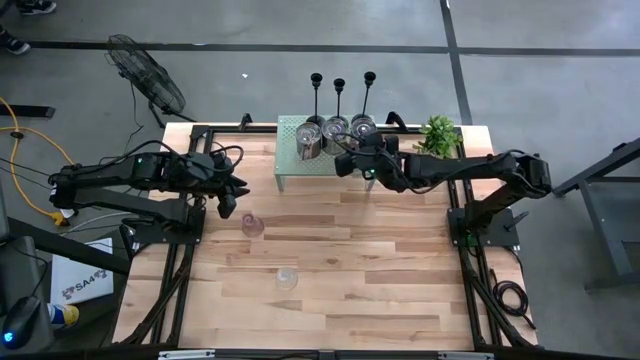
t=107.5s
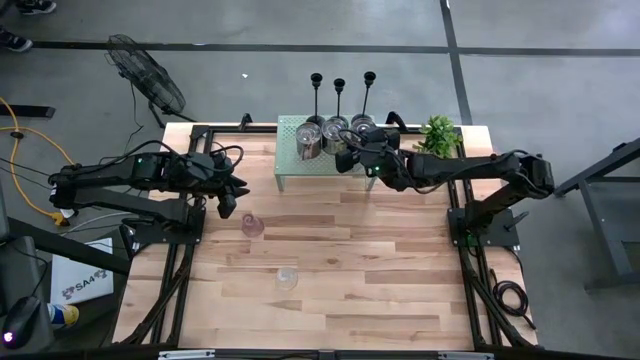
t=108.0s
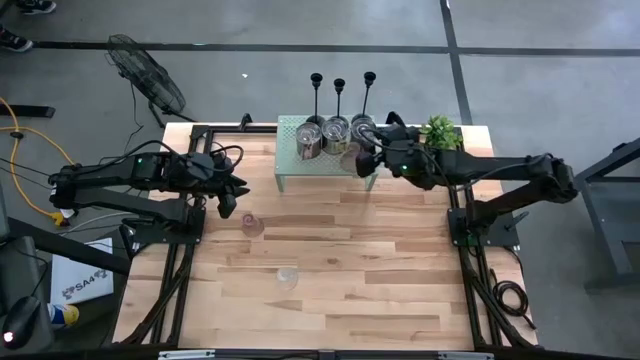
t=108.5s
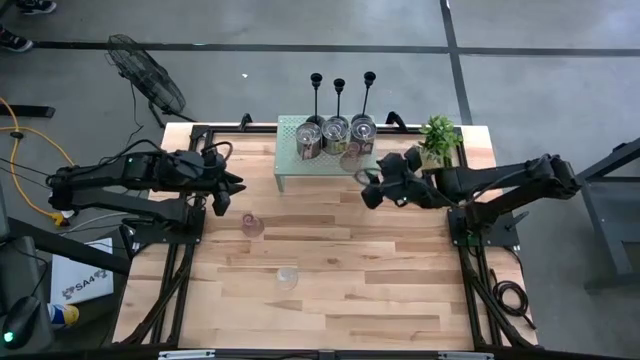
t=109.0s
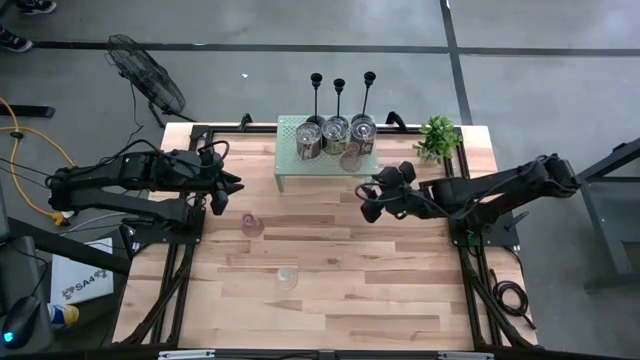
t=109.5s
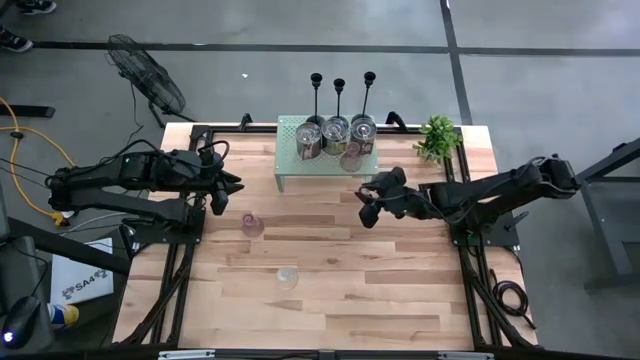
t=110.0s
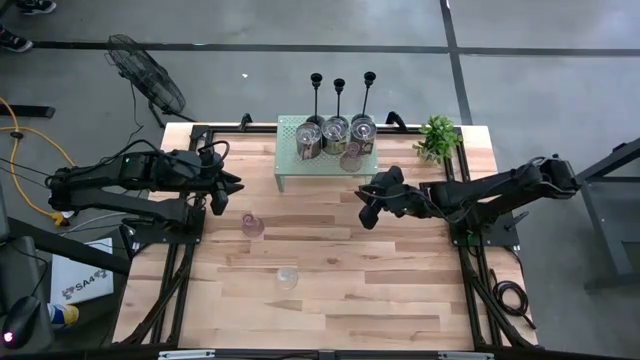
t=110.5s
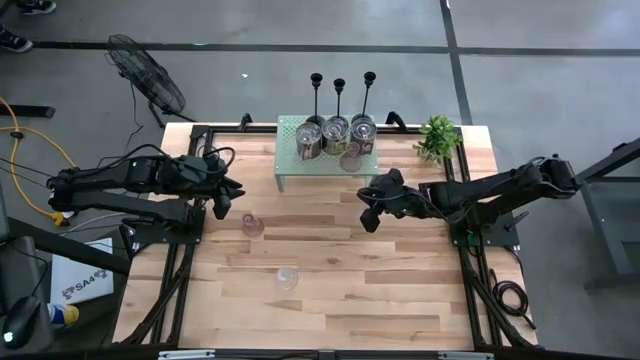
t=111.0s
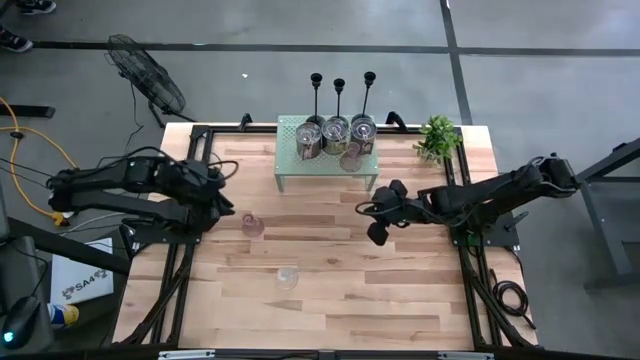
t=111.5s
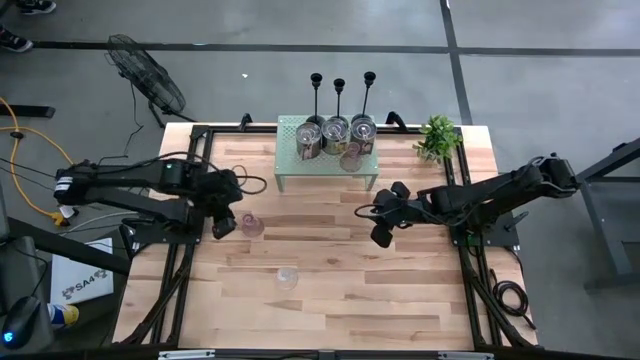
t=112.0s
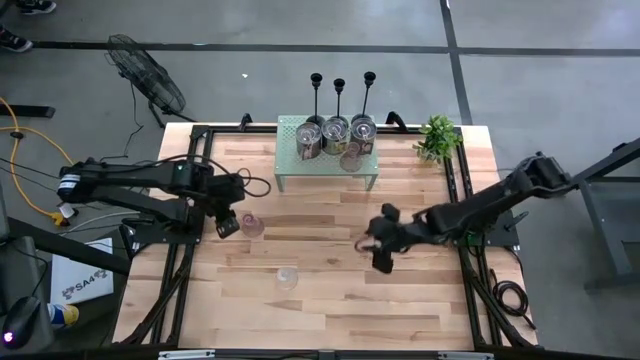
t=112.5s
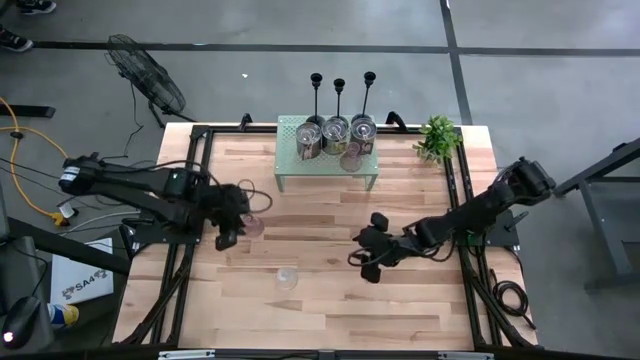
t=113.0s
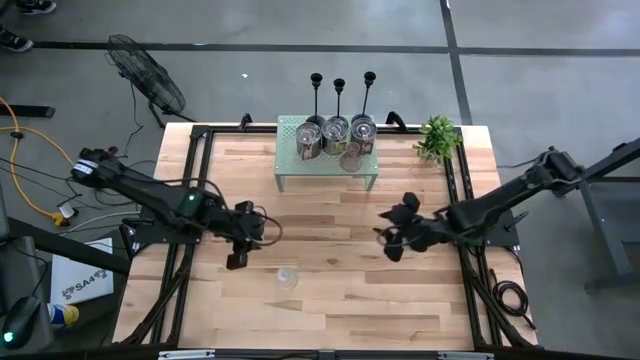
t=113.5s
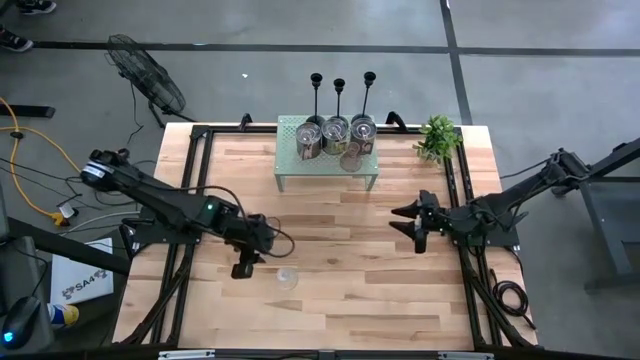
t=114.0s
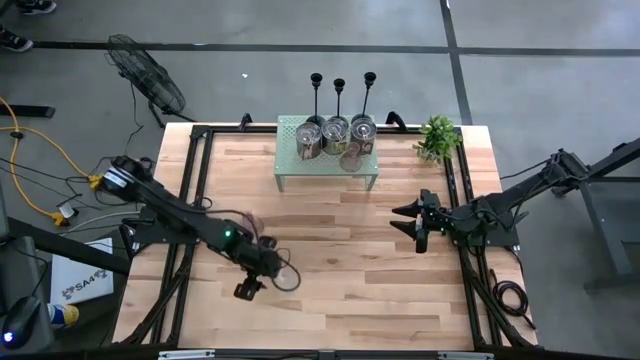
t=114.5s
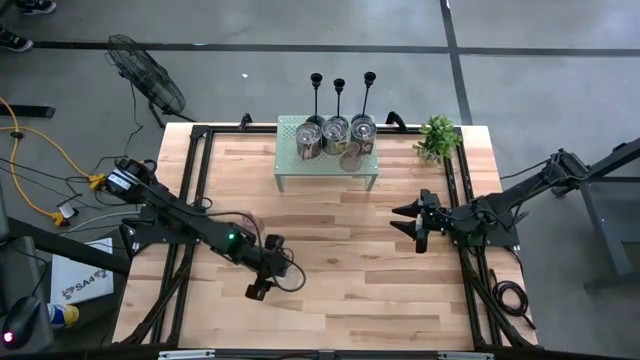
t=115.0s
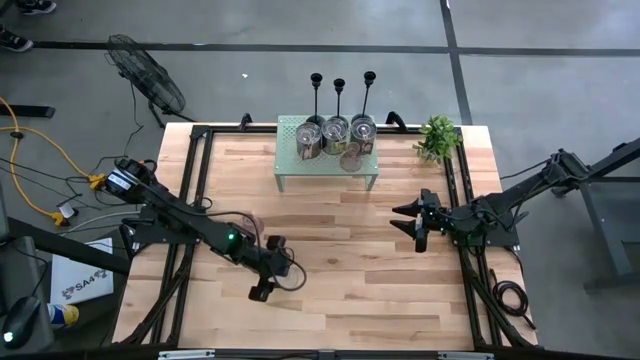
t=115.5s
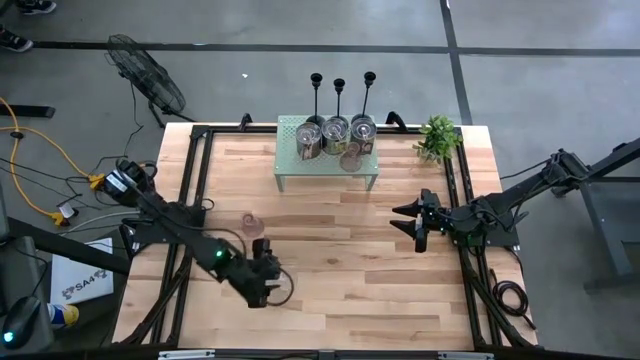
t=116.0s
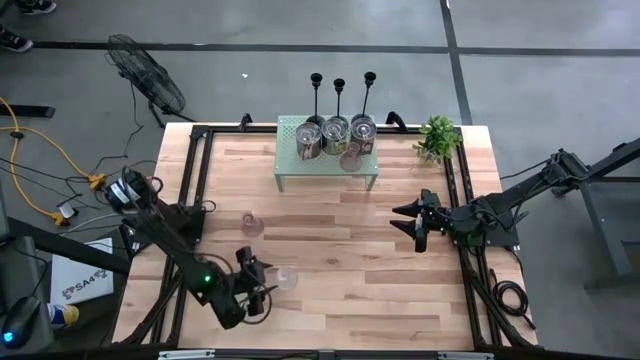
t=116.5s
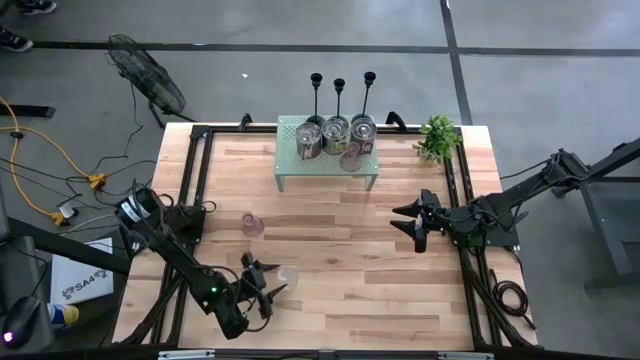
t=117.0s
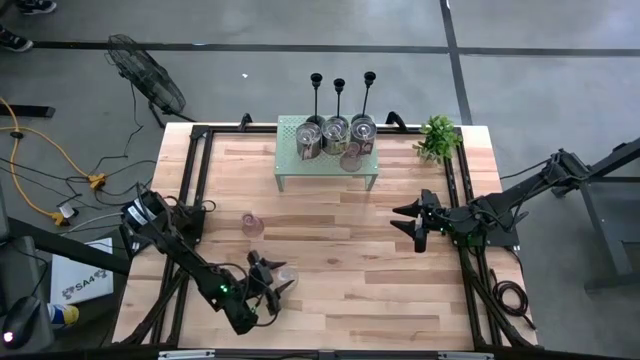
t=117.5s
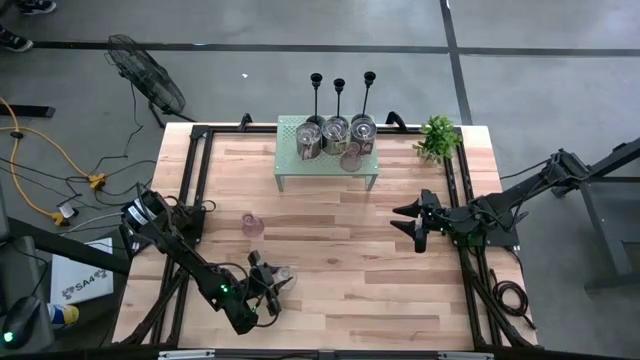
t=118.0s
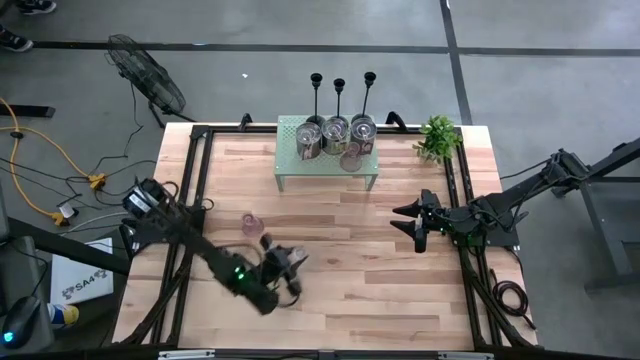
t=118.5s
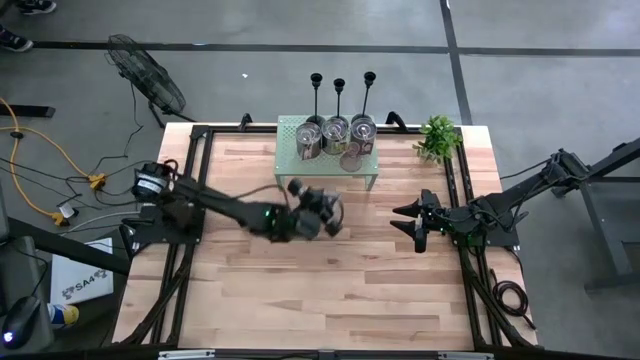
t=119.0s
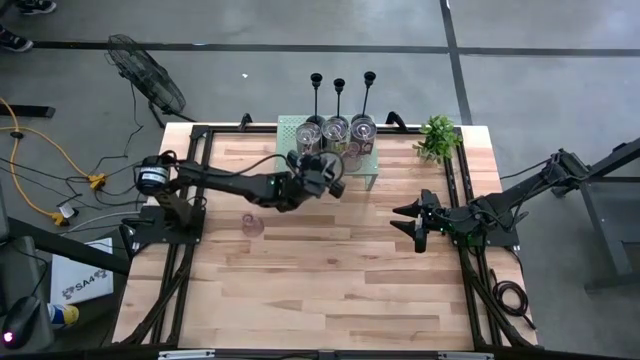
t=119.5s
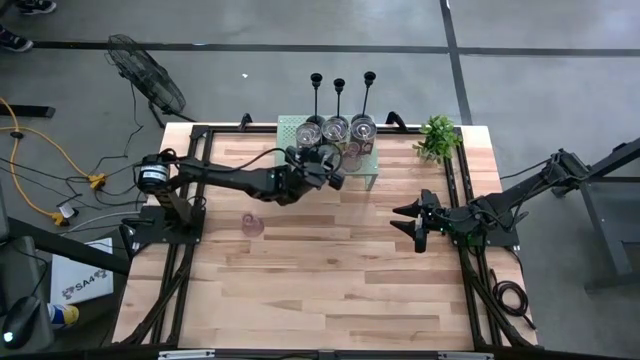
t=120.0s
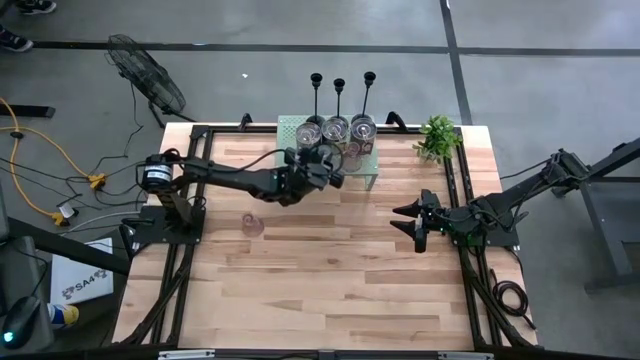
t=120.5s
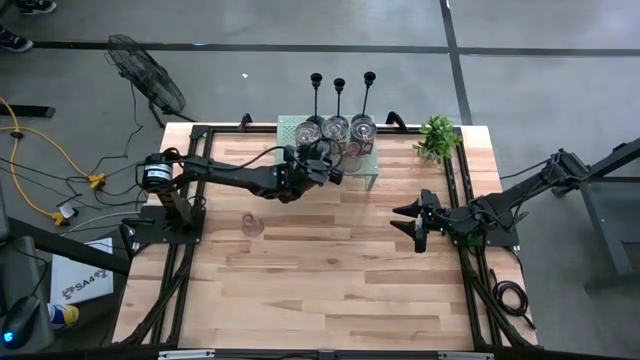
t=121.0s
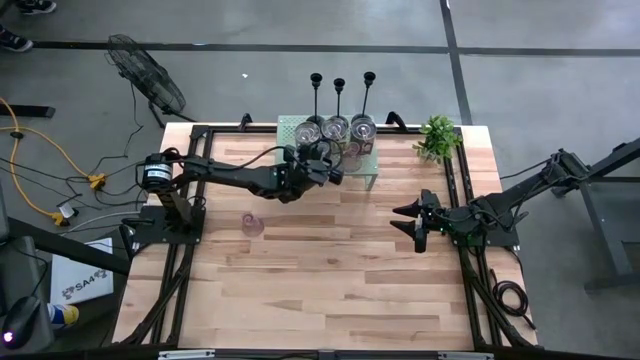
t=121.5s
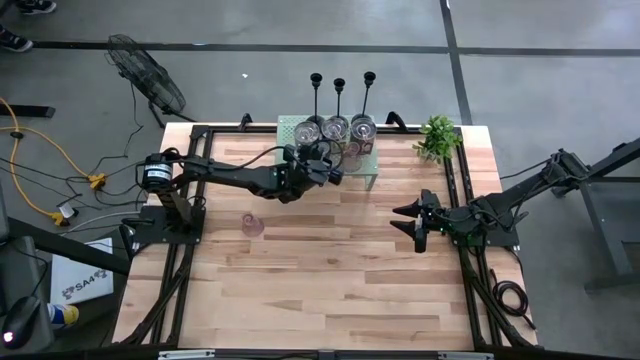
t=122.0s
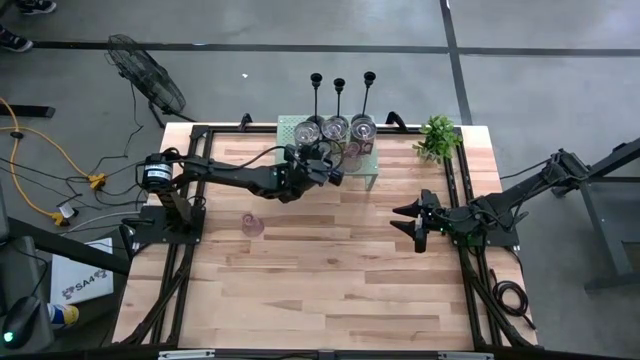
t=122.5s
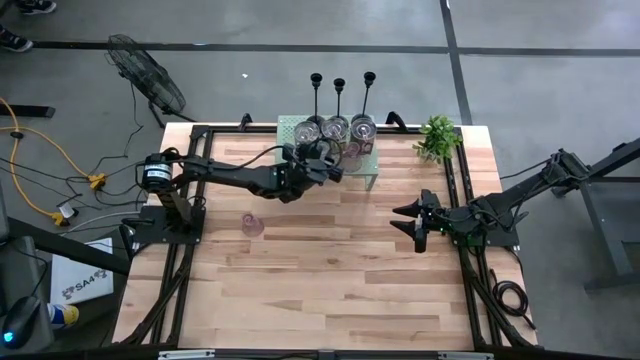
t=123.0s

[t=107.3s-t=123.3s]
Task: Pick & Place candle stick holders
Put the transparent glass candle holder on the shelf aligned with the pink glass candle holder

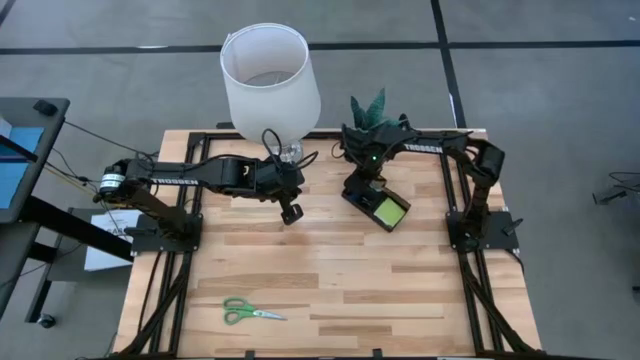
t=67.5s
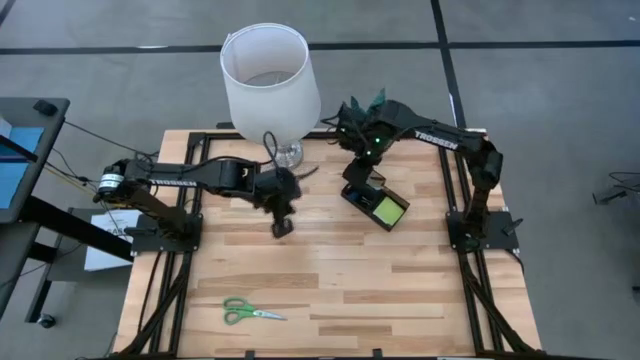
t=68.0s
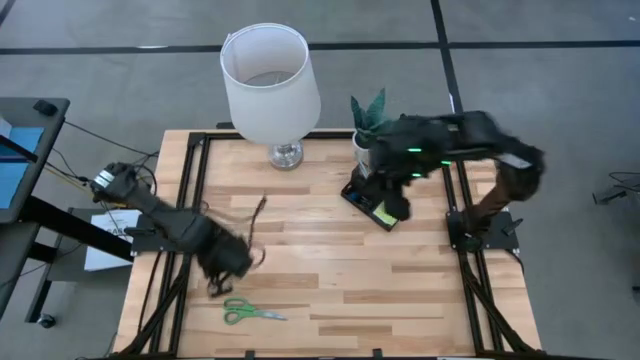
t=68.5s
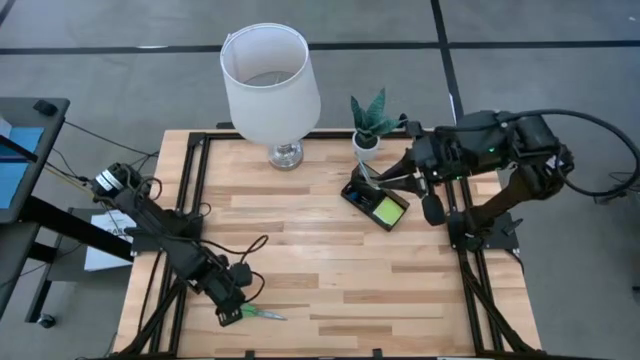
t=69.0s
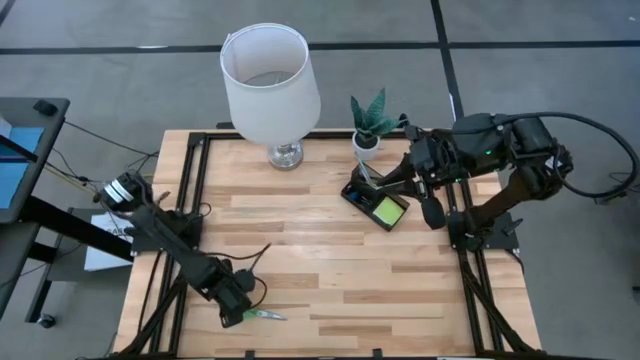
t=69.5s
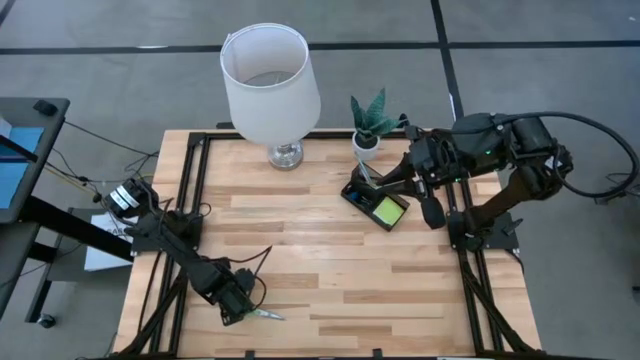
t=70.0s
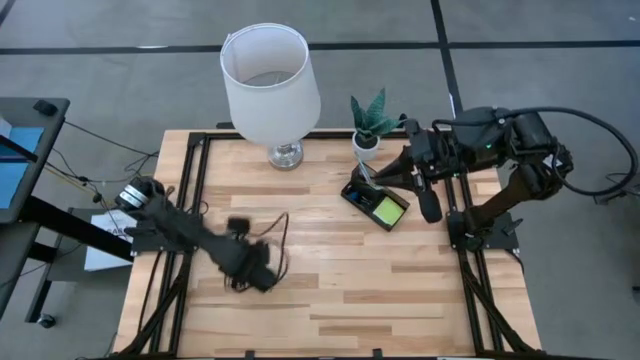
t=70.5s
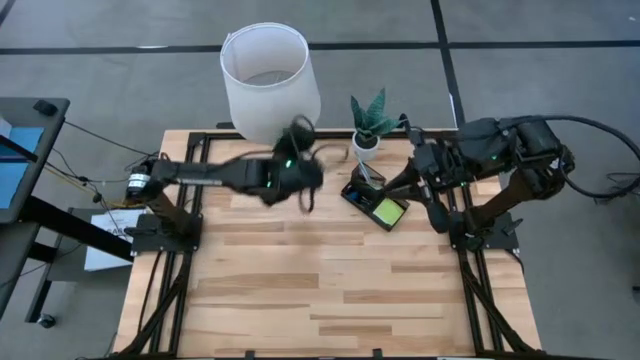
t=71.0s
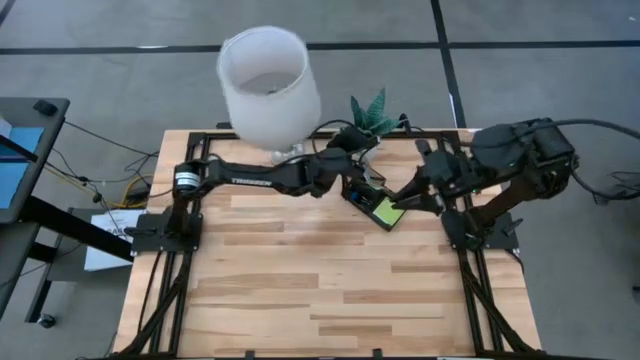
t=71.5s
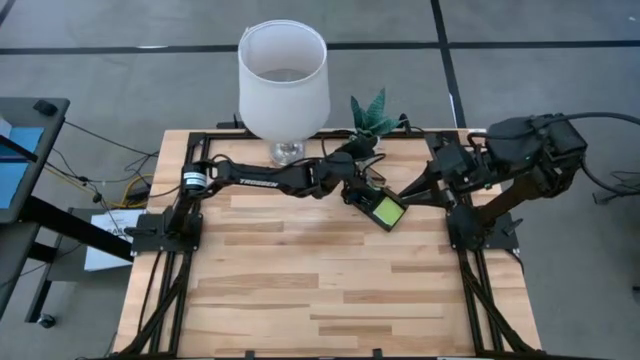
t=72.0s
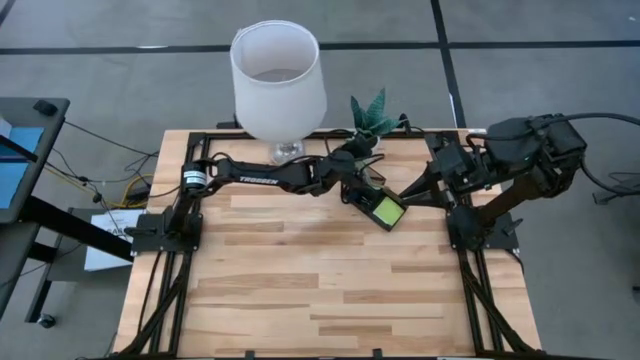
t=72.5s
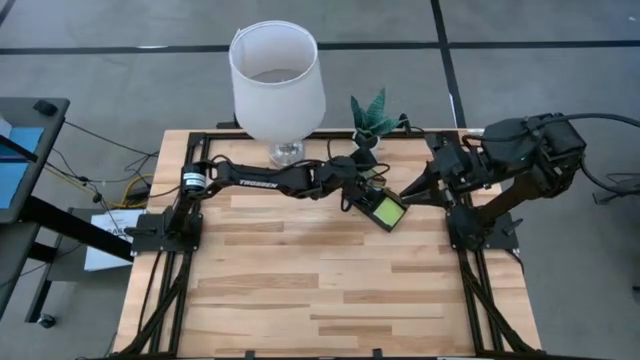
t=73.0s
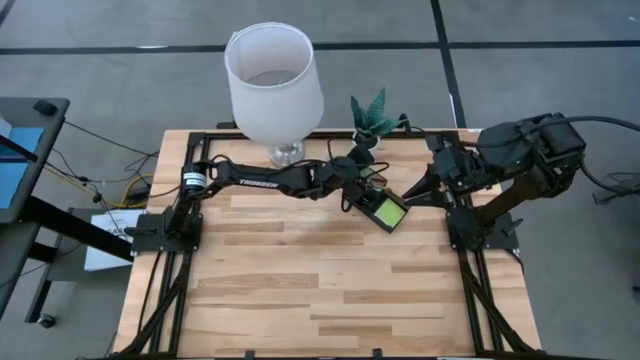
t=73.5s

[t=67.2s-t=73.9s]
Task: Pick and place office supplies into organizer
Put the green scissors into the black organizer
